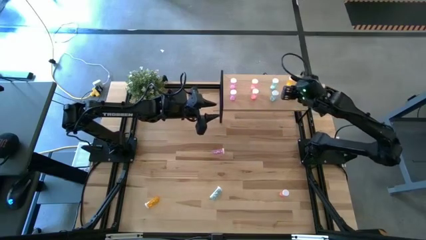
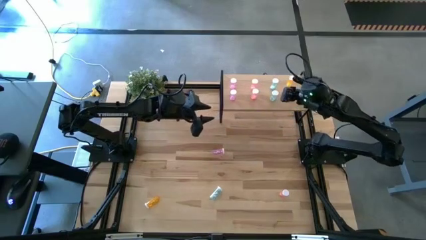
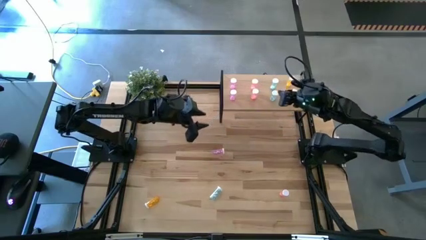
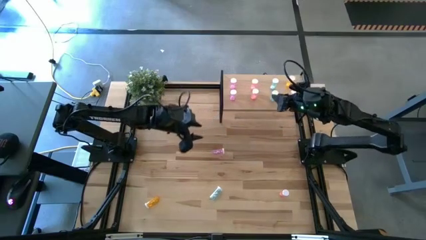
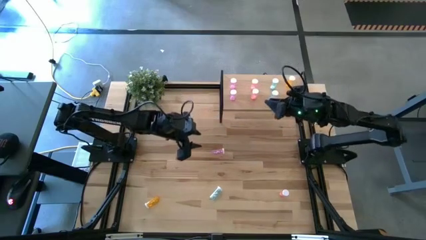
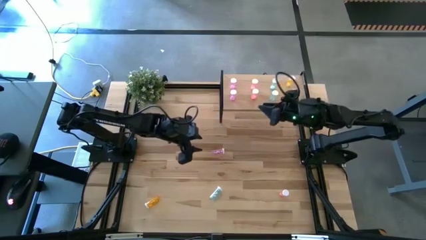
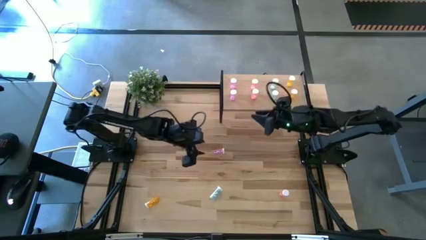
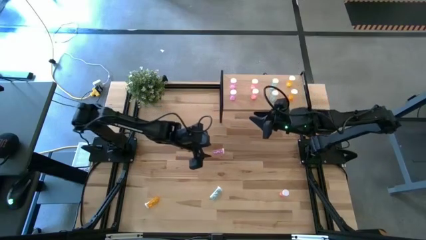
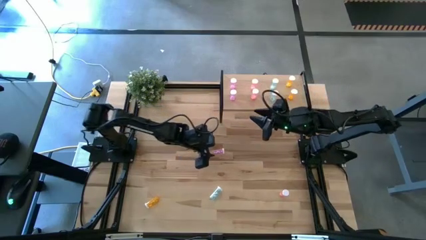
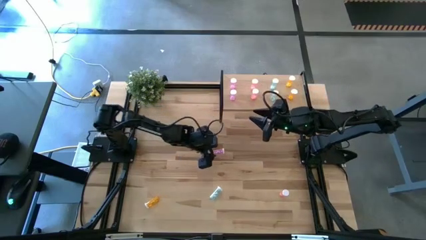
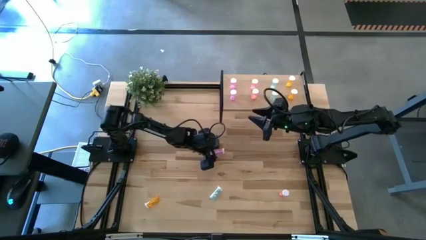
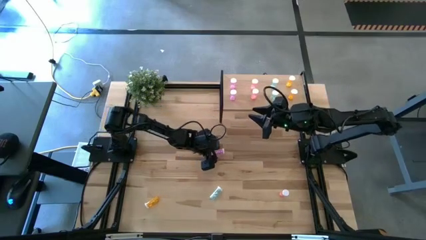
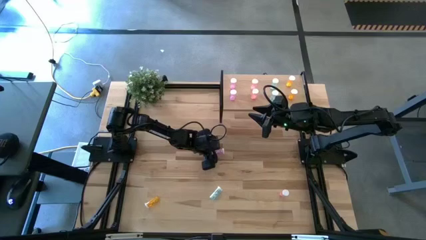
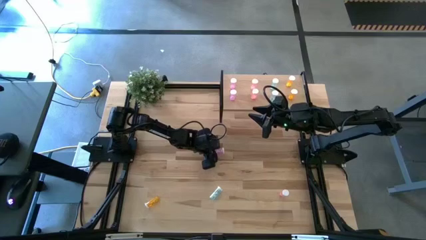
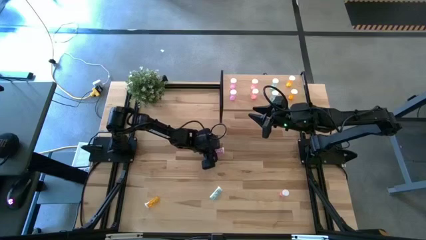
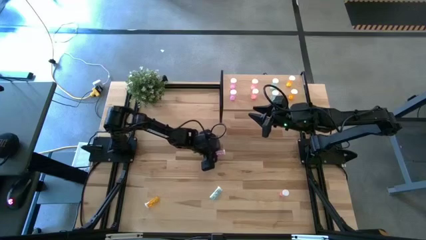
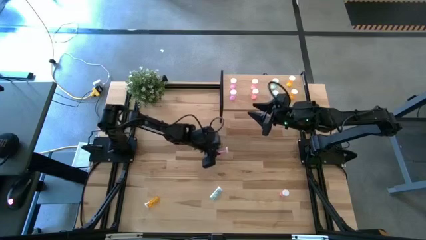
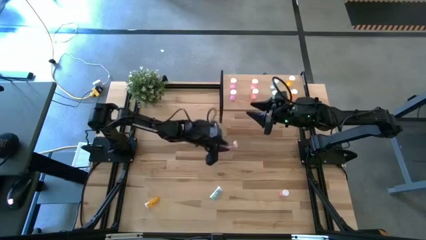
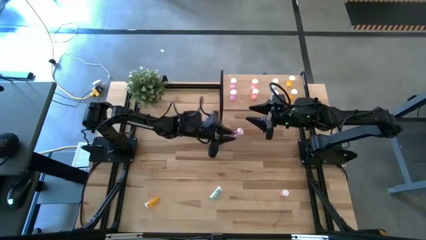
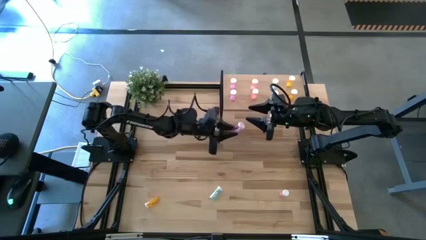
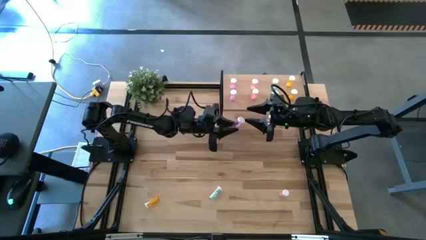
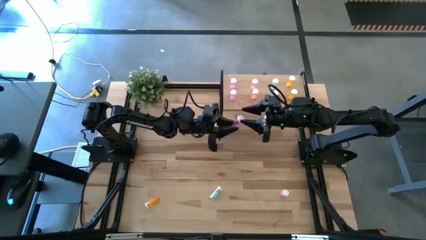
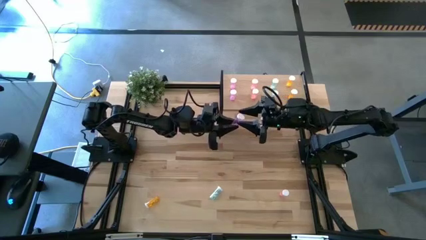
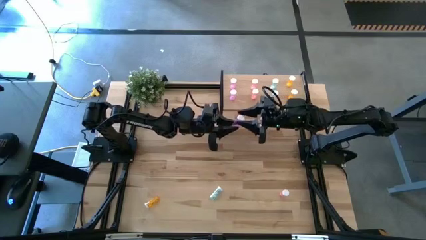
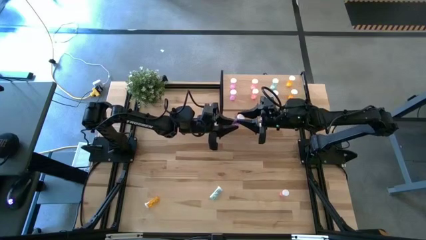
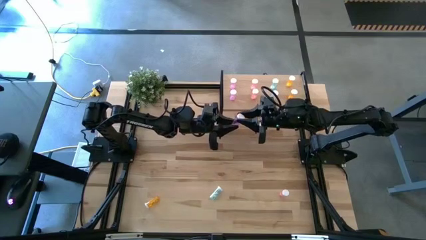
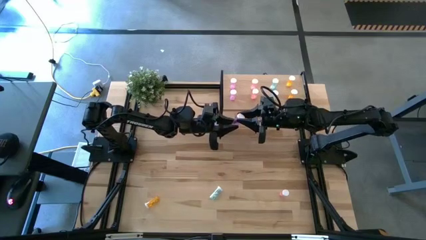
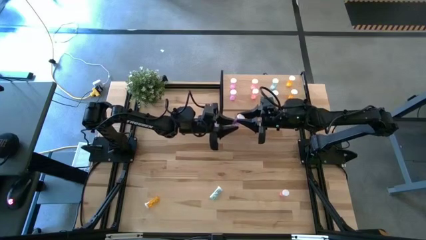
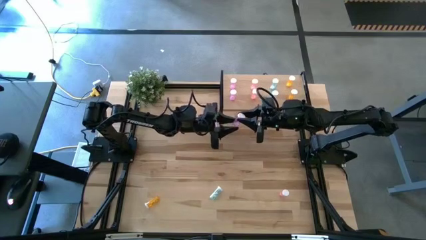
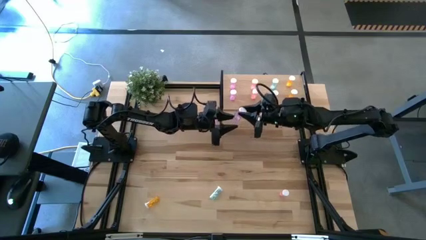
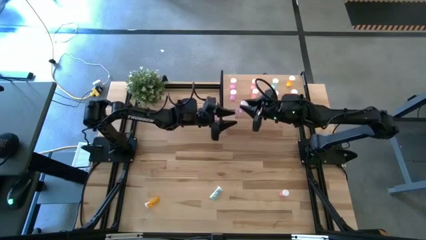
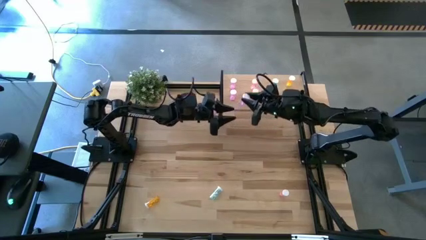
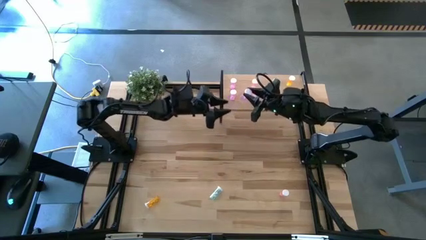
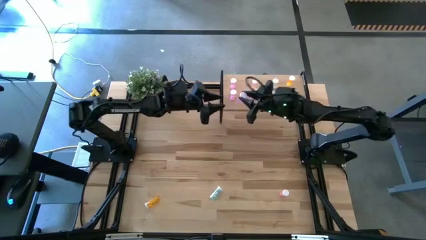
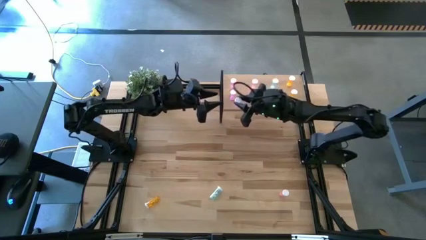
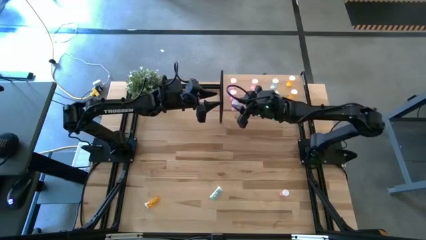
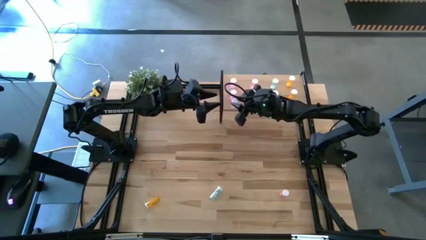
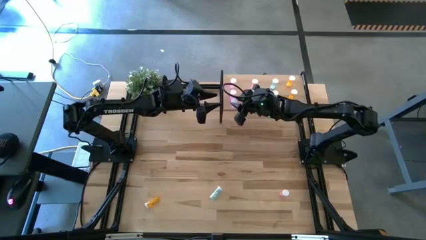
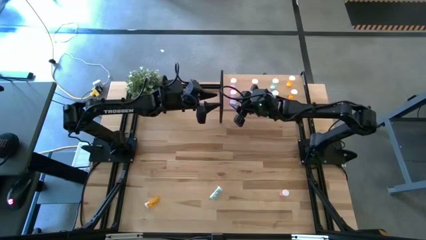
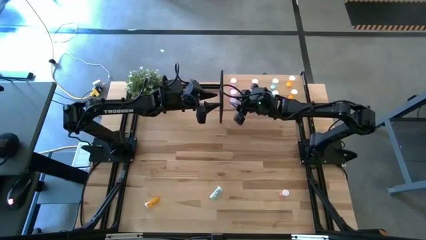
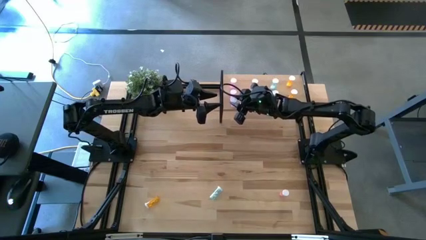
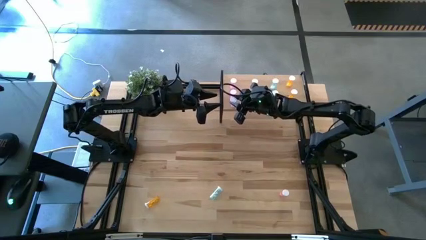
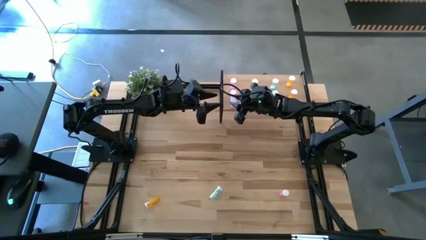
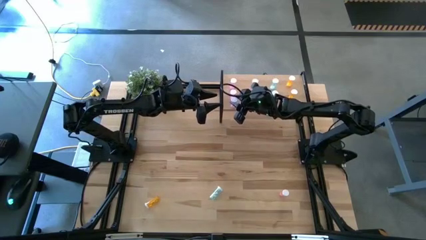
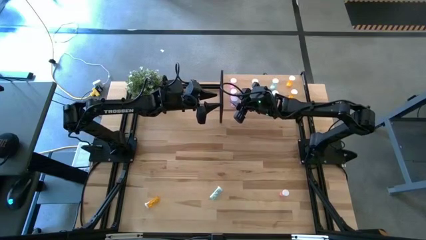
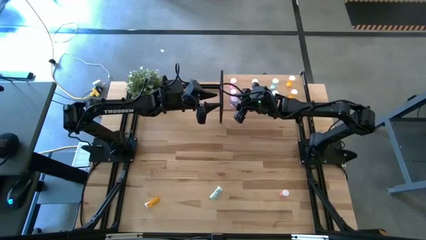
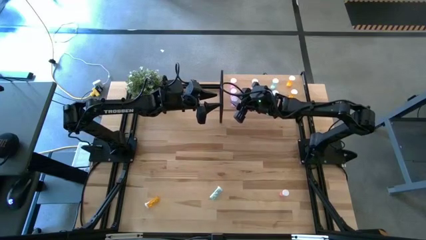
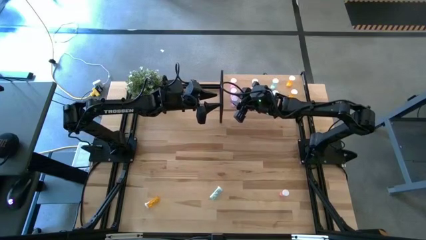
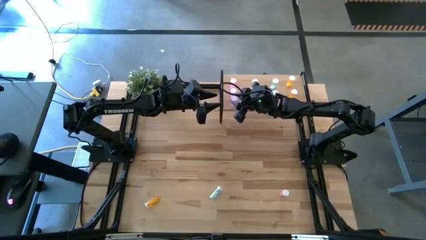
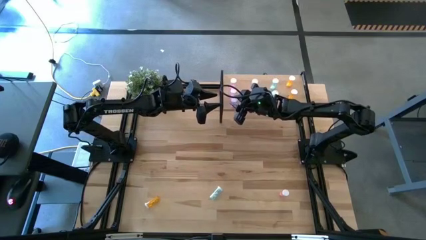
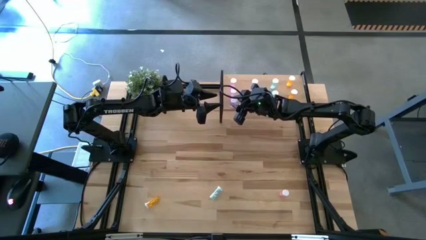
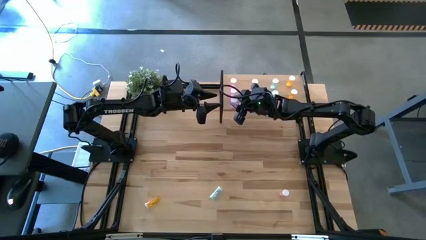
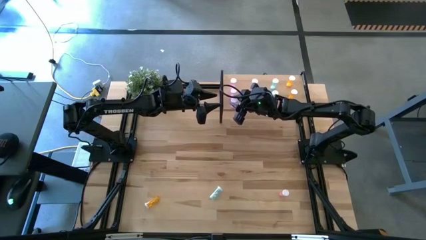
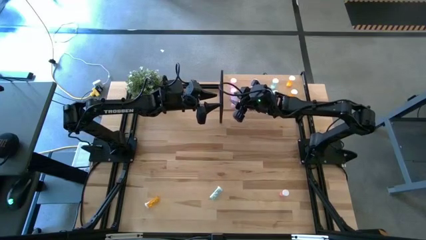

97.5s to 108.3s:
Task: Pick and place medicine bottles onto shelf by color
Put the pink pill bottle on the shelf aligned with the other pink pill bottles

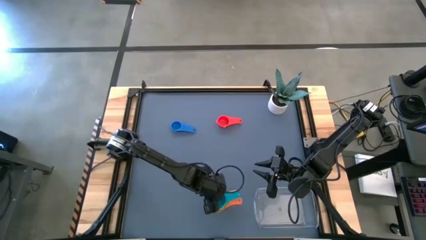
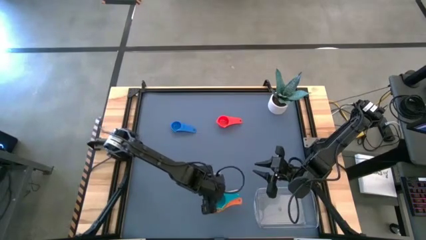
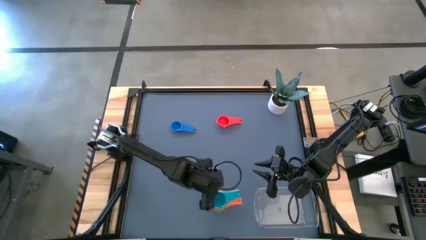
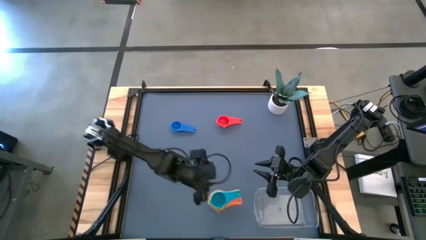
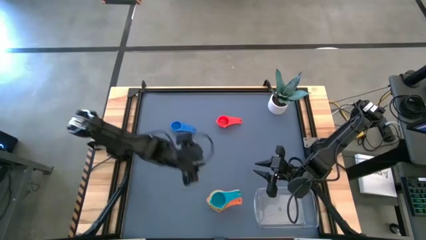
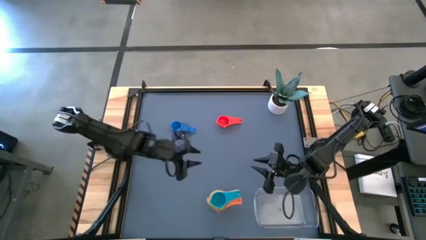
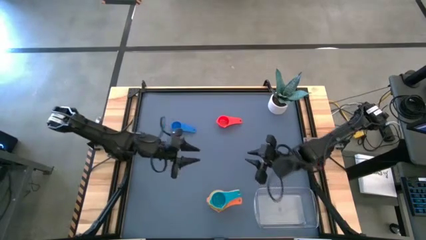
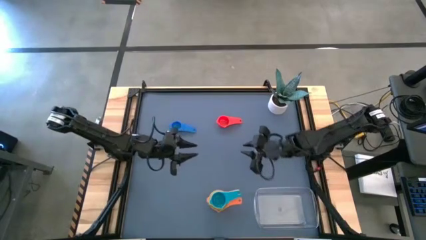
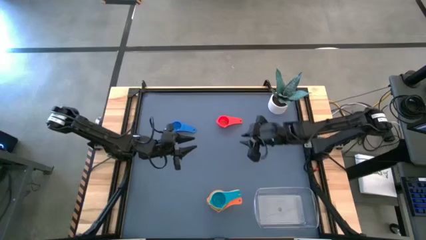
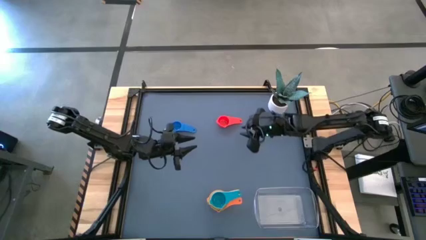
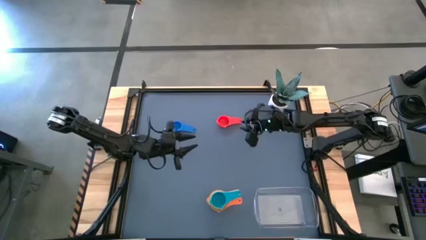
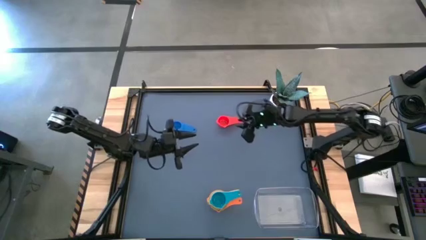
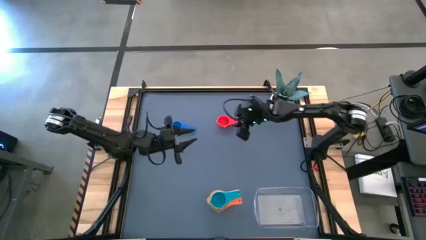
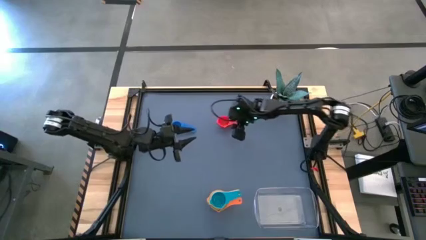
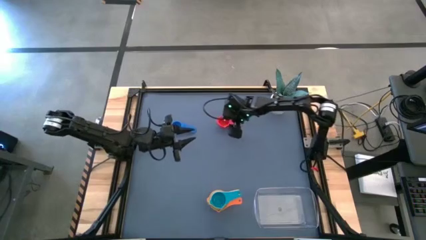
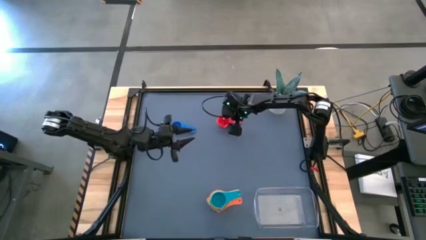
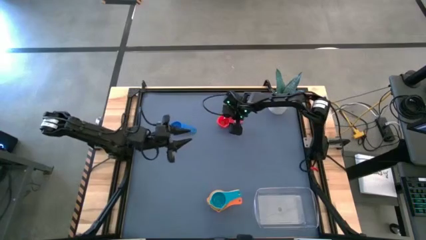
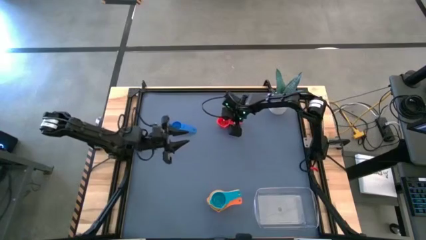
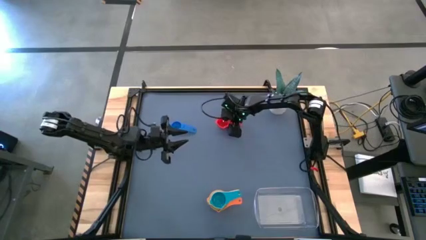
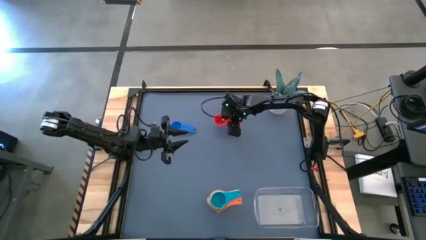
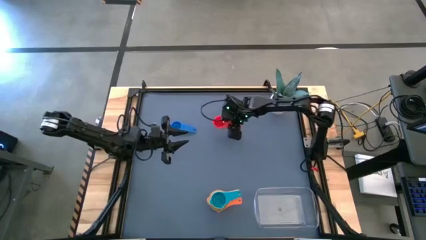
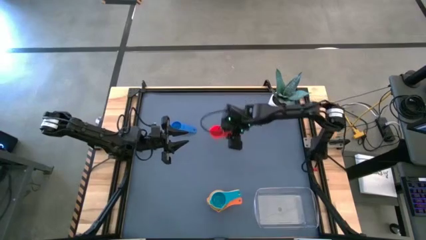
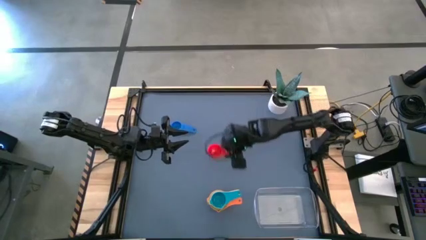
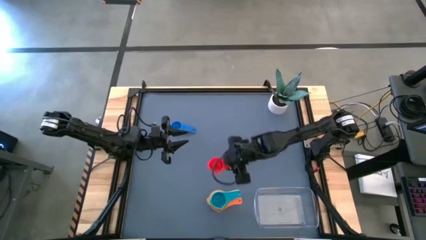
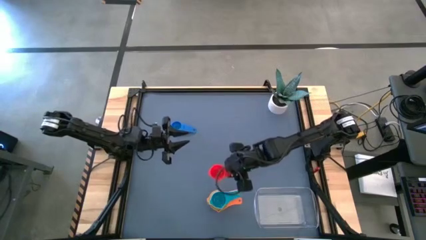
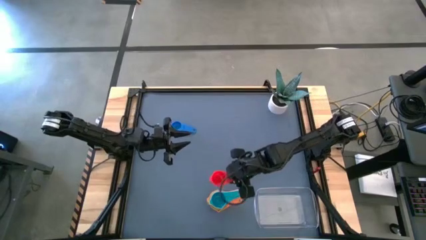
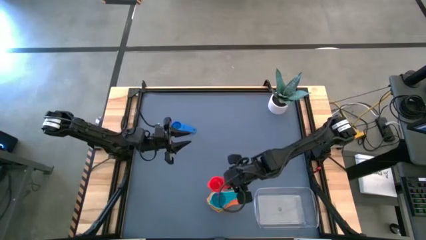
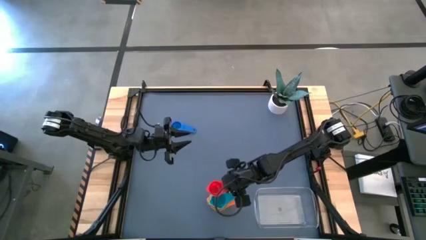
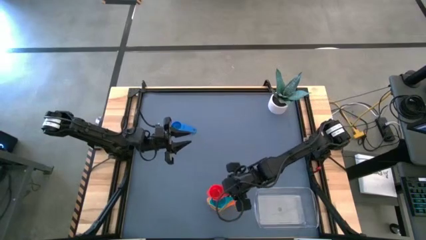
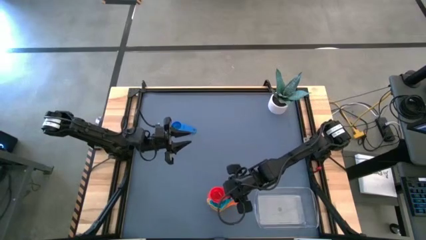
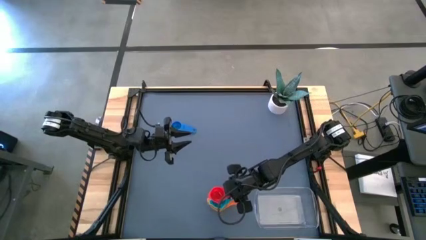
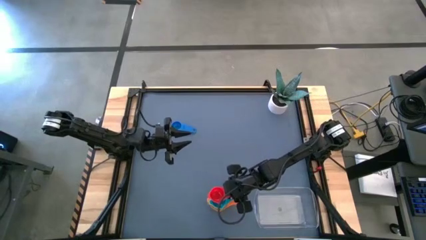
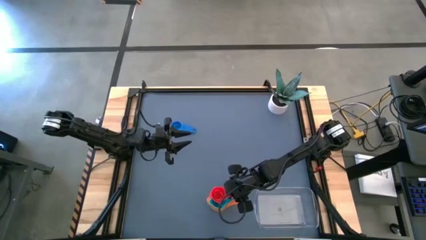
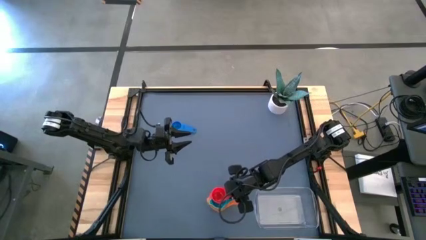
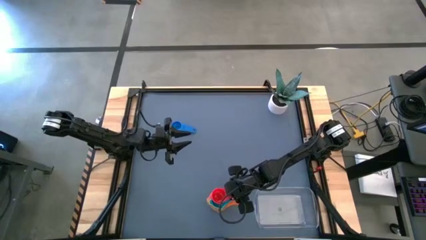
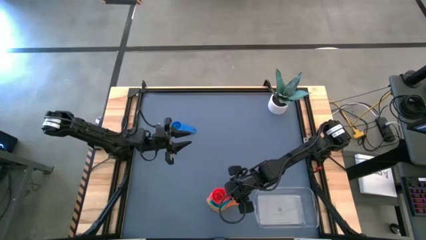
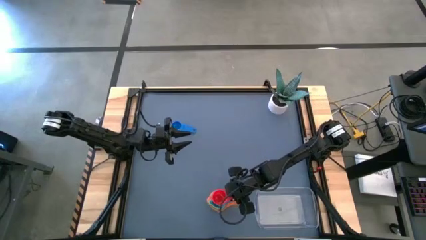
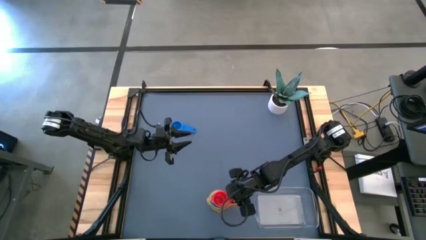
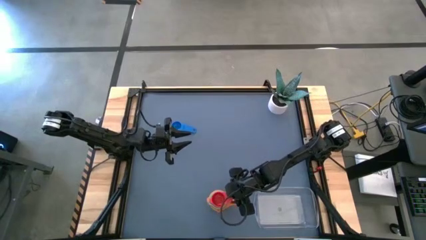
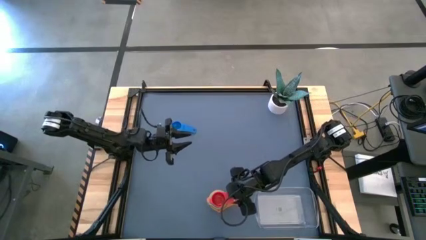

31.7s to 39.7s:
Task: Nest measuring cups in basket
Stack the red measuring cup on top of the light blue measuring cup
